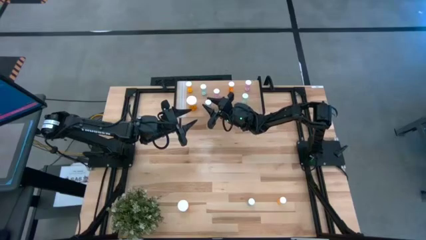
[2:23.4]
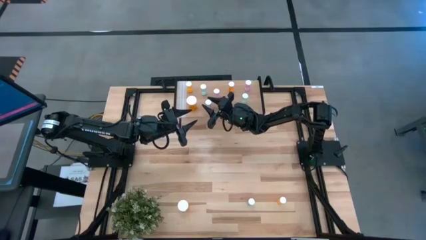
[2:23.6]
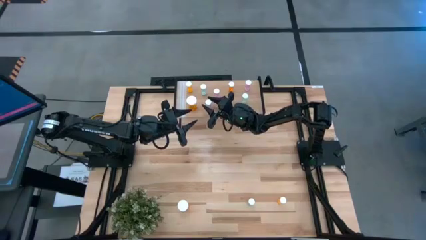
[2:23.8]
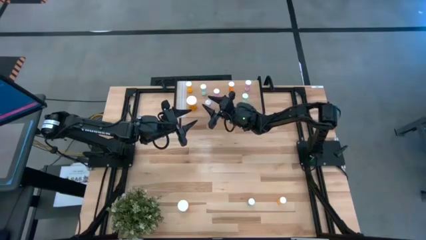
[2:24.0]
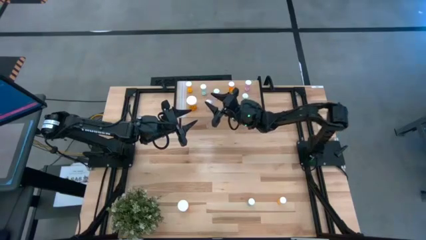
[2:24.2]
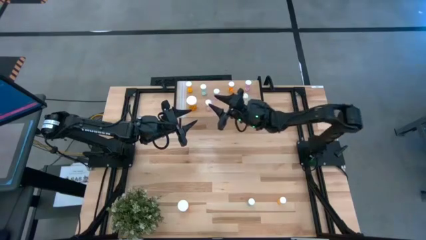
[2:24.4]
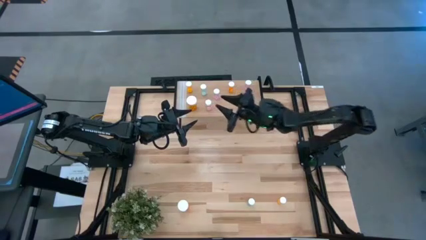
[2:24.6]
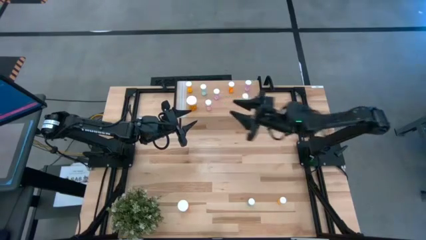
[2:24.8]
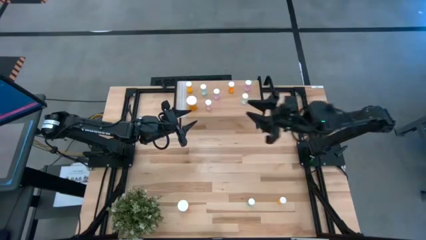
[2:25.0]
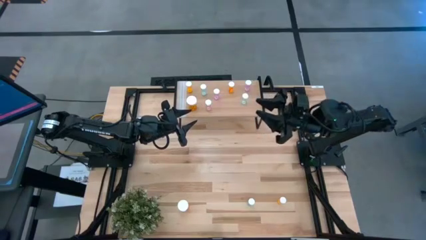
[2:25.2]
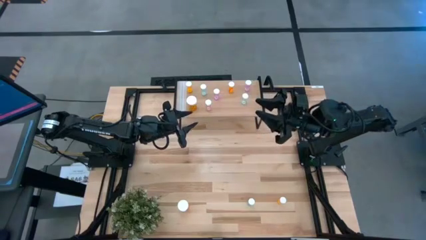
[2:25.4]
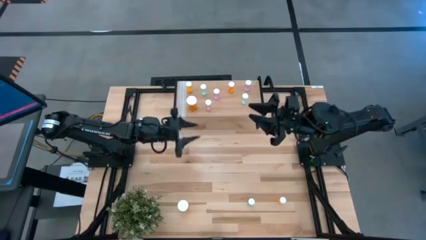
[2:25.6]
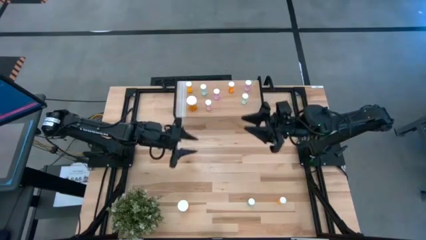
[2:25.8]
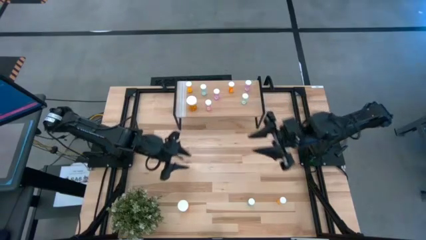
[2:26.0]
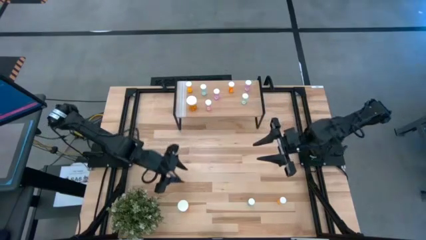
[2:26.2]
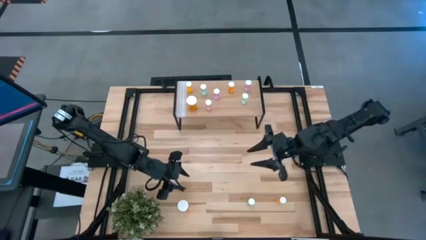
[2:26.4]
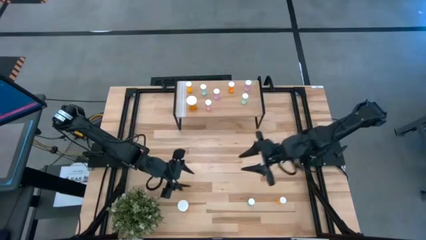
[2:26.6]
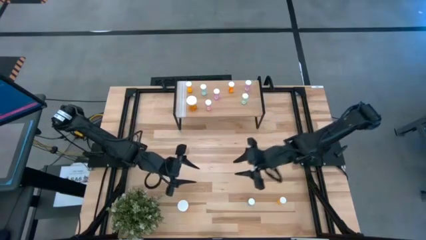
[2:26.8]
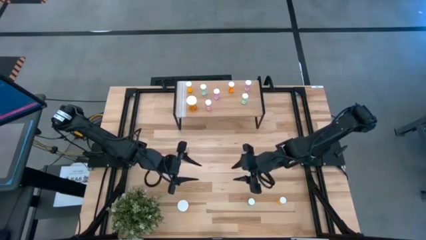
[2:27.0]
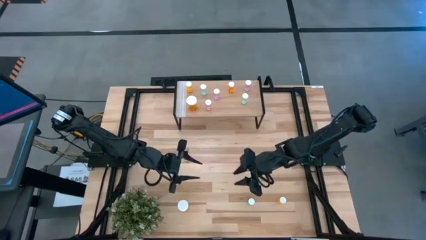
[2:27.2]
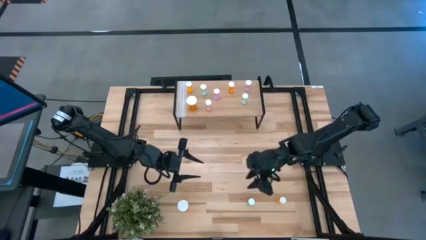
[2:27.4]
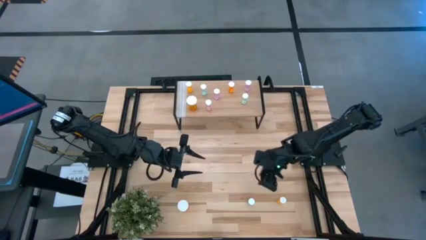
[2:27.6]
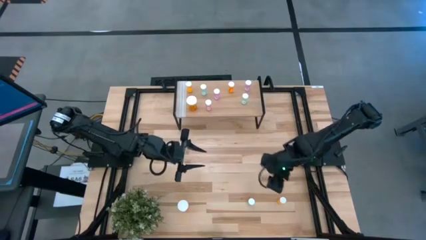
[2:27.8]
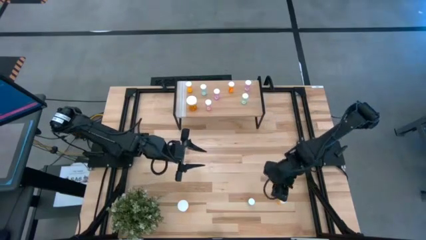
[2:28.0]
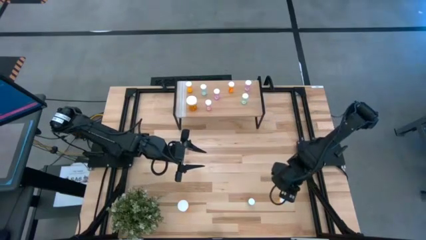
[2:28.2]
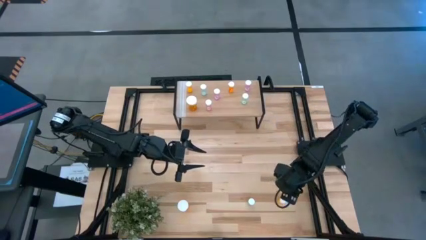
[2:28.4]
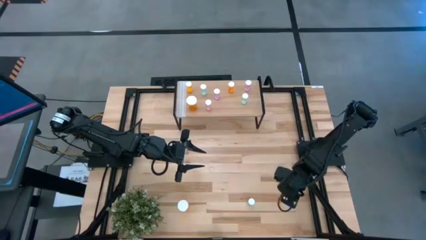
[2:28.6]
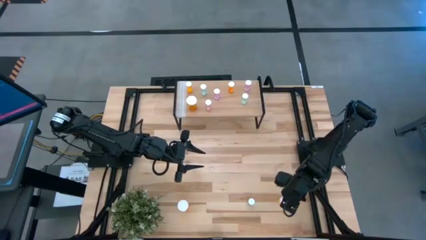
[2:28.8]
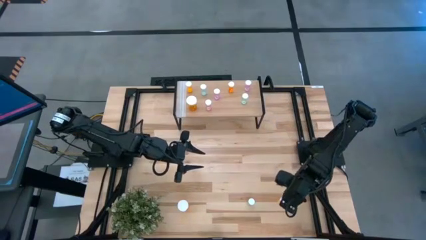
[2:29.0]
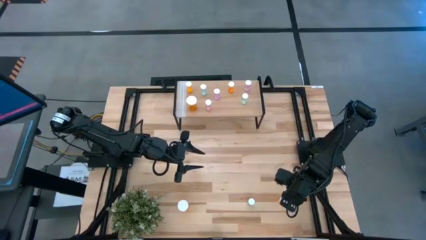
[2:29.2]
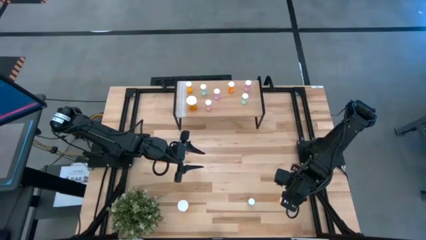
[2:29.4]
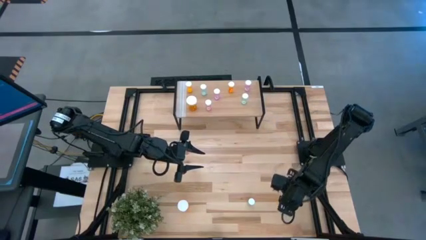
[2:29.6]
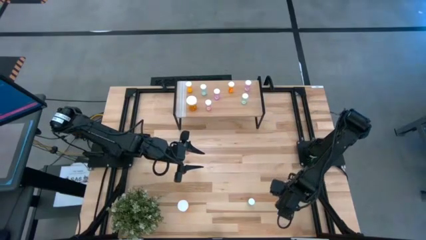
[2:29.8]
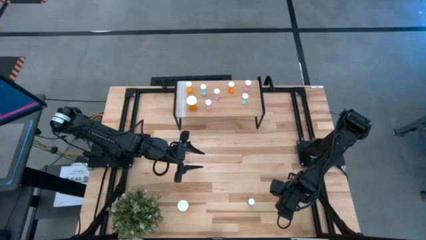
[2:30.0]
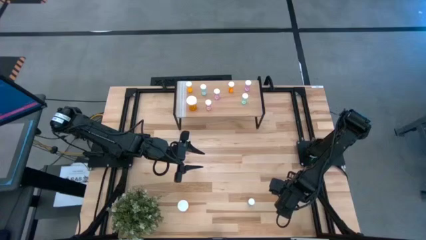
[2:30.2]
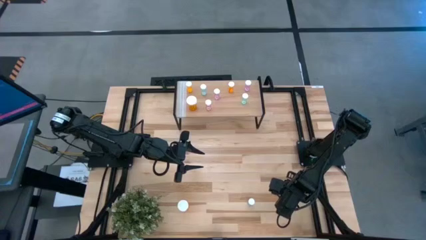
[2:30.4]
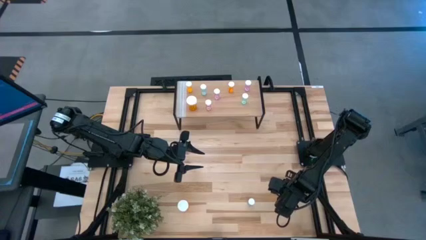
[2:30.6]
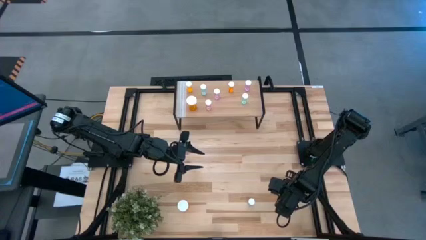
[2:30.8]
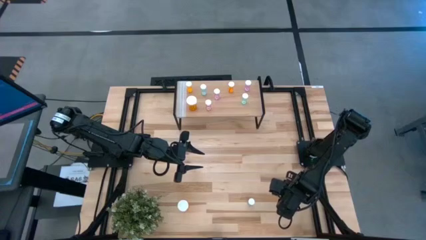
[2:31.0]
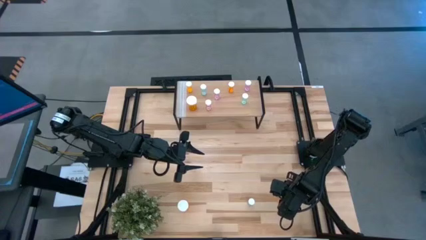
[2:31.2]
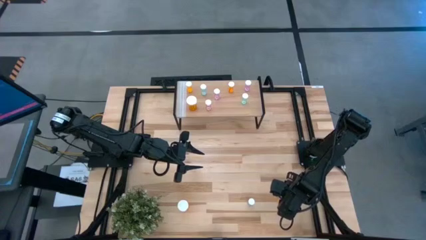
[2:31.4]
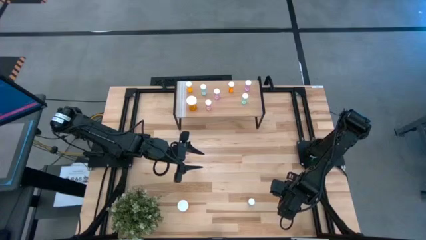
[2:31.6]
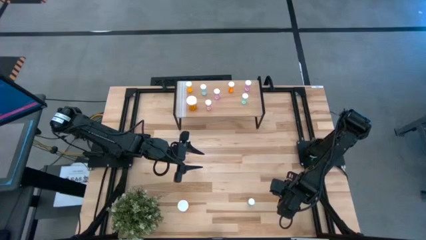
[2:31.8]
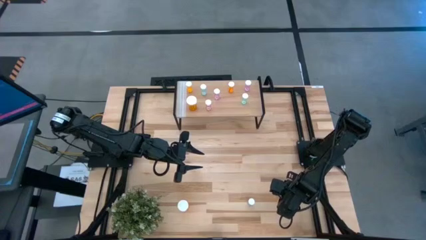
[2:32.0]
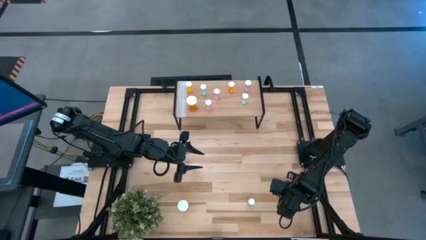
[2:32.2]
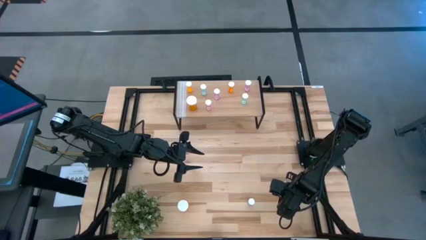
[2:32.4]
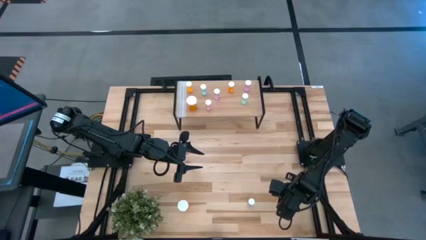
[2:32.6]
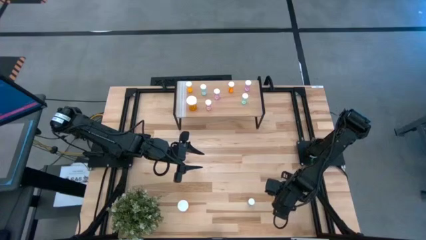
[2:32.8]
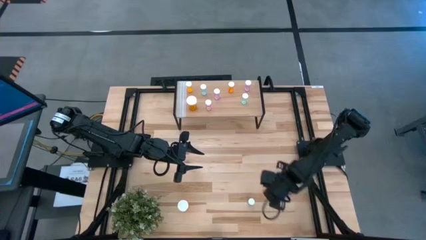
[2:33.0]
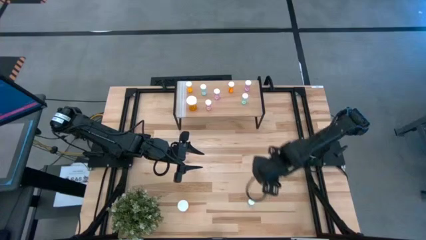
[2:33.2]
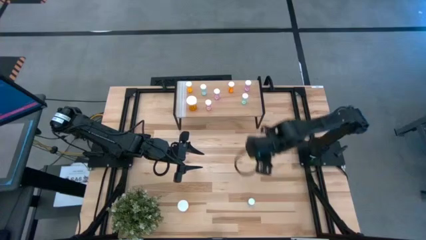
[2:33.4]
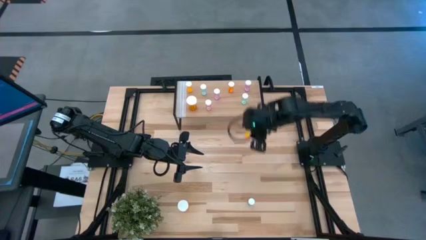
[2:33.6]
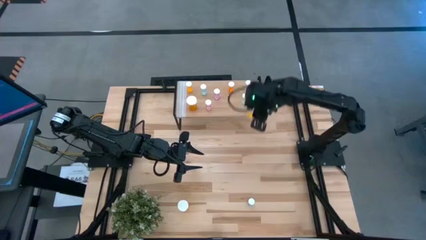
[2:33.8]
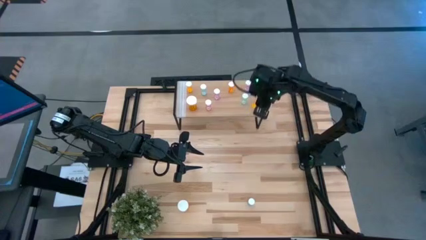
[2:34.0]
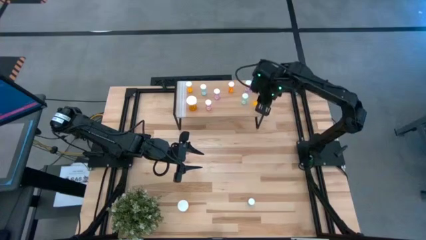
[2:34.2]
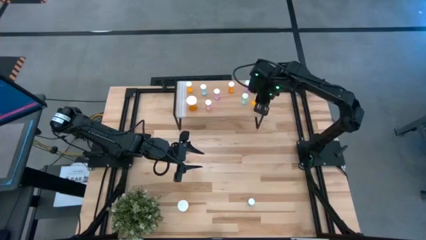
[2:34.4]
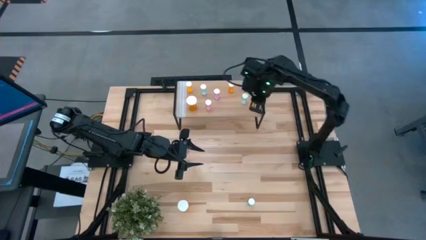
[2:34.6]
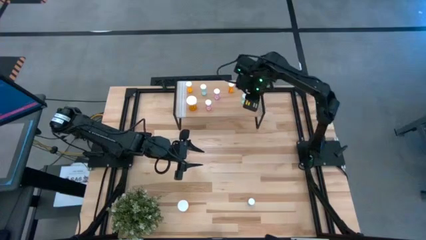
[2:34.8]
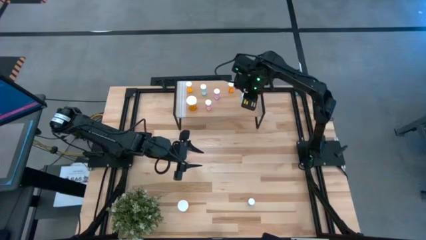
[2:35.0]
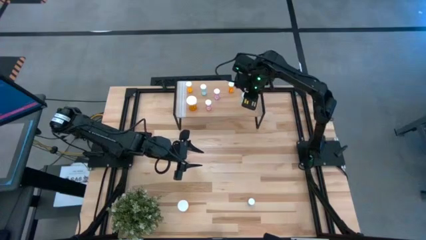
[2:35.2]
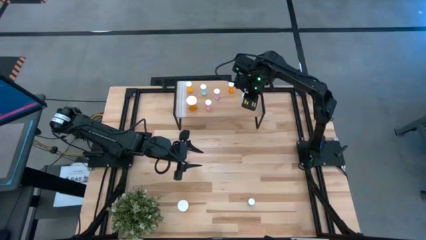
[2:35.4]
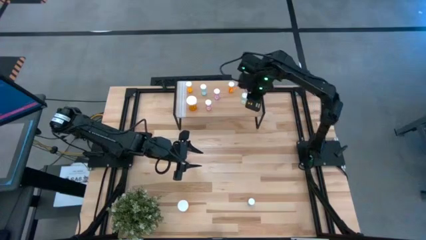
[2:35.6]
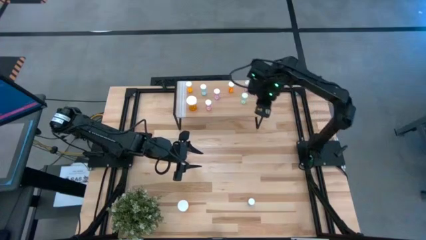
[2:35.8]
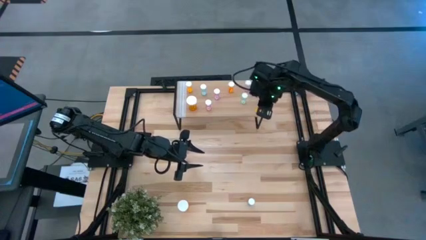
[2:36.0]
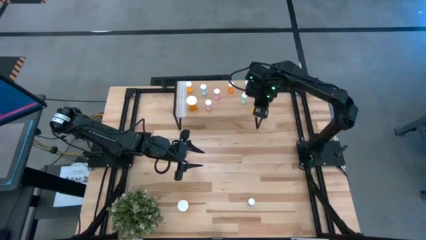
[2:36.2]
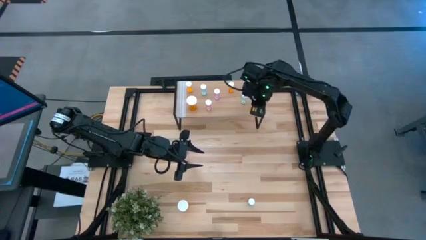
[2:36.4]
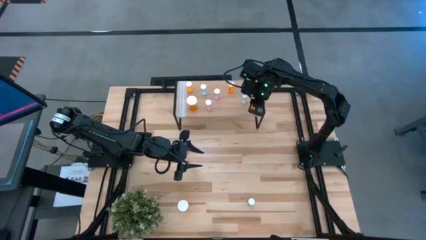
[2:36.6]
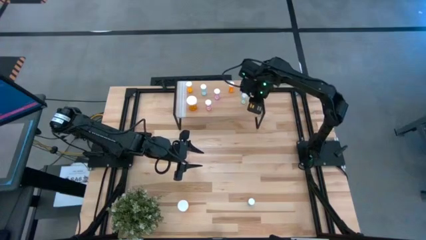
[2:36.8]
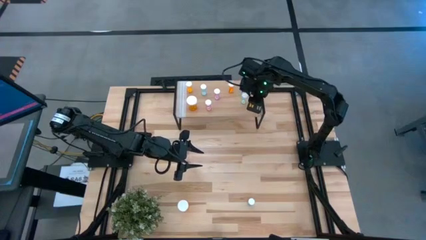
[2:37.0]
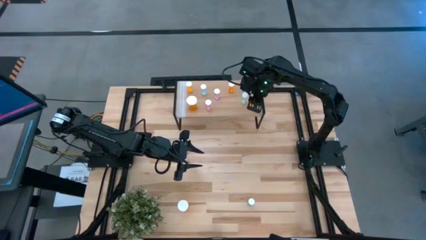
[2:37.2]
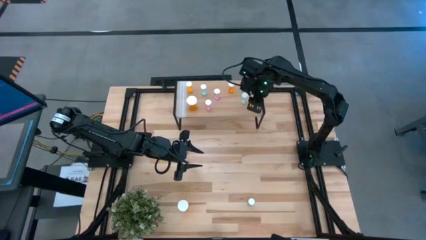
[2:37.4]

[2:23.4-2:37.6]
Task: Pick and place medicine bottles onto shelf by color
Put the orange small pill bottle on the shelf
